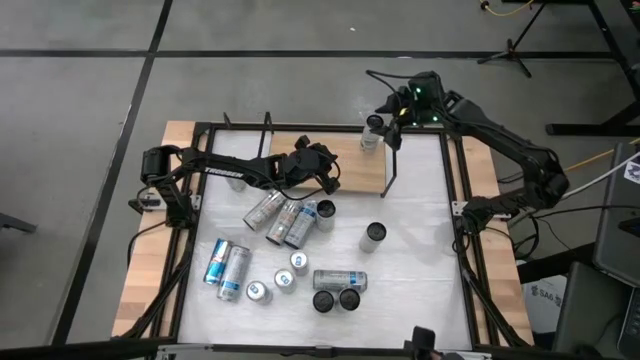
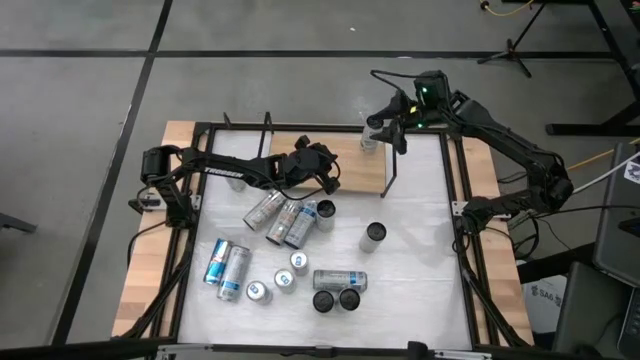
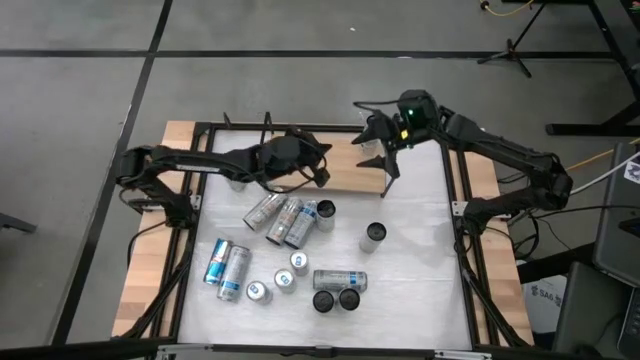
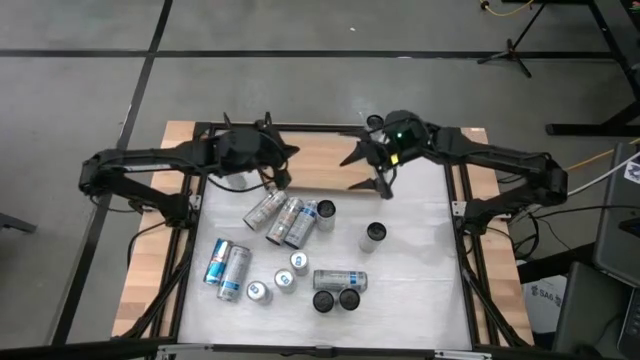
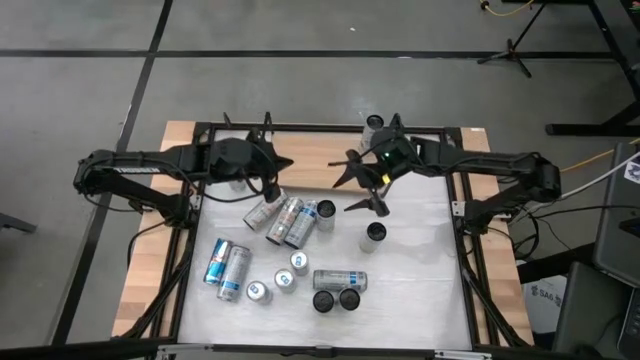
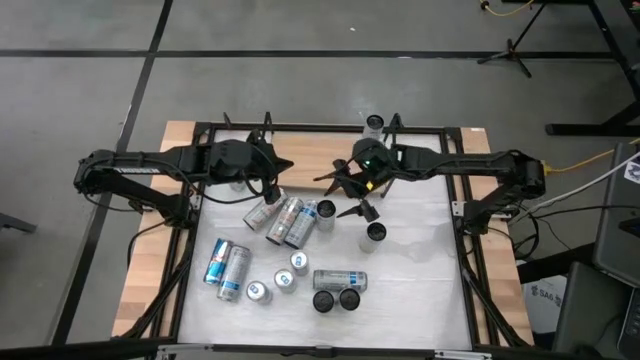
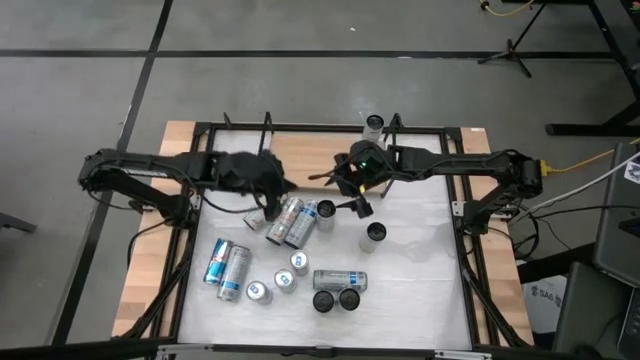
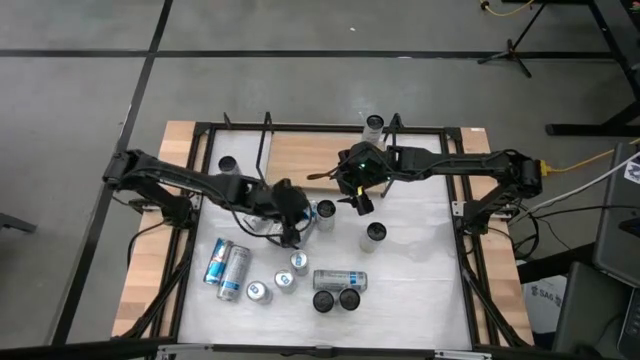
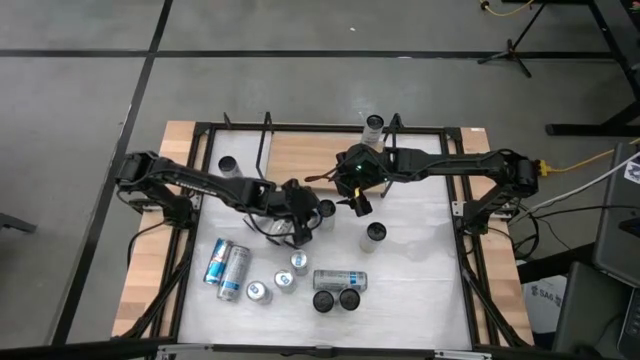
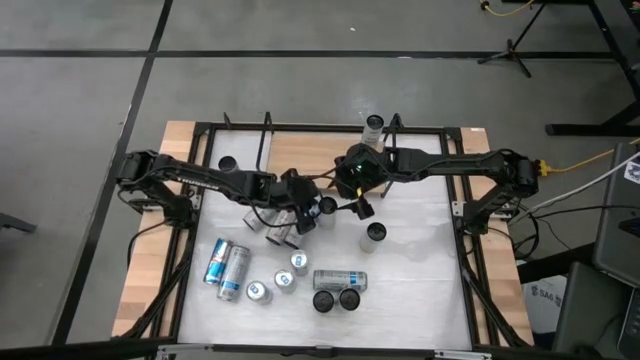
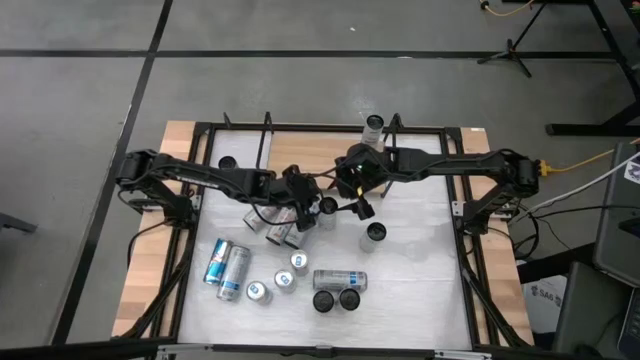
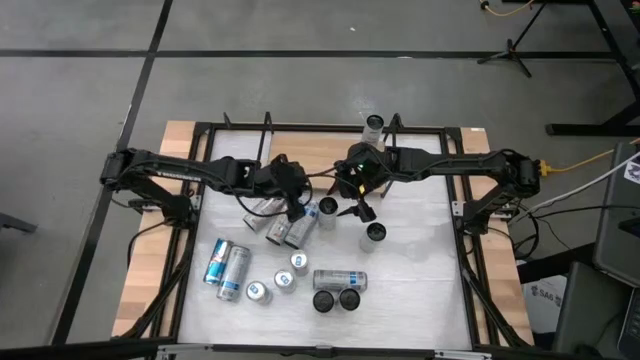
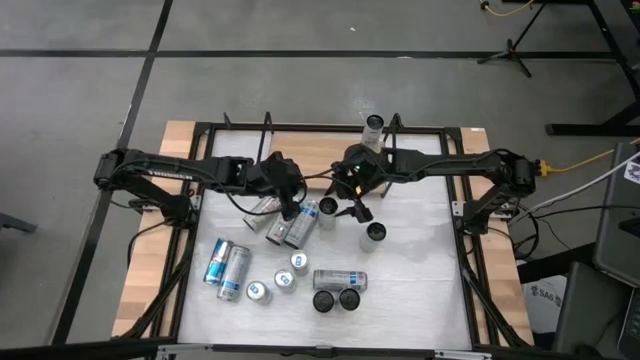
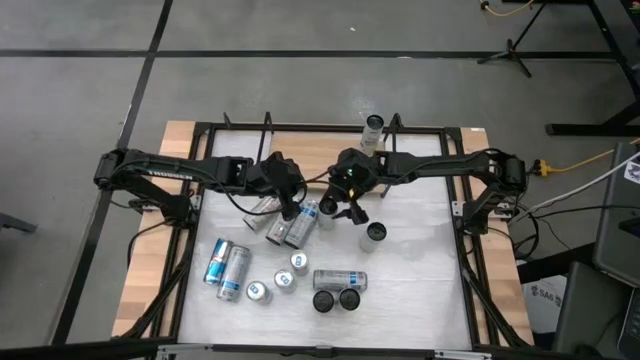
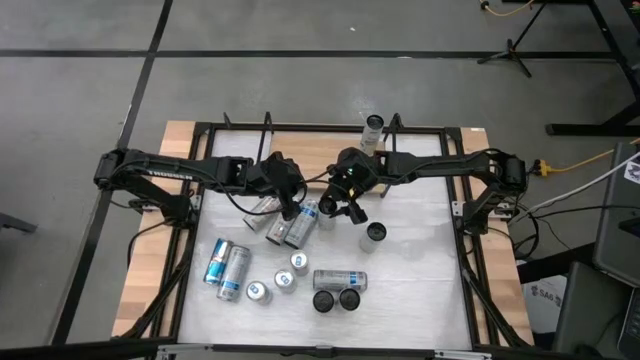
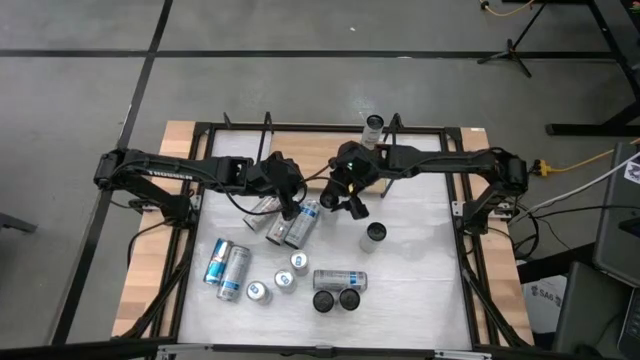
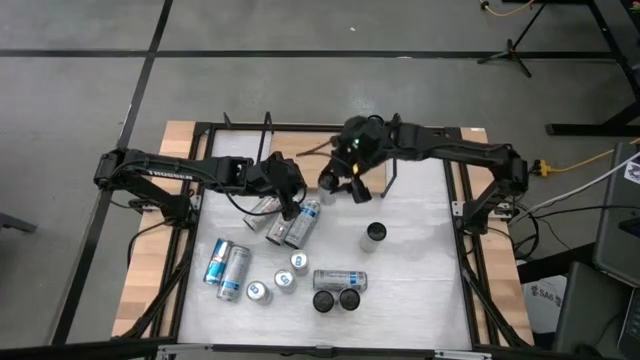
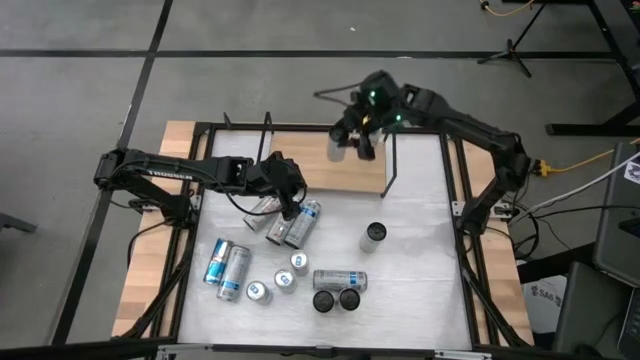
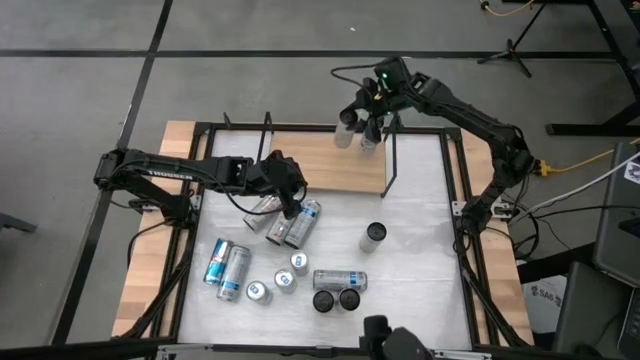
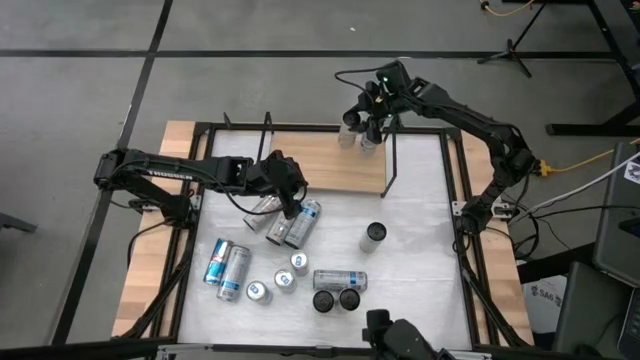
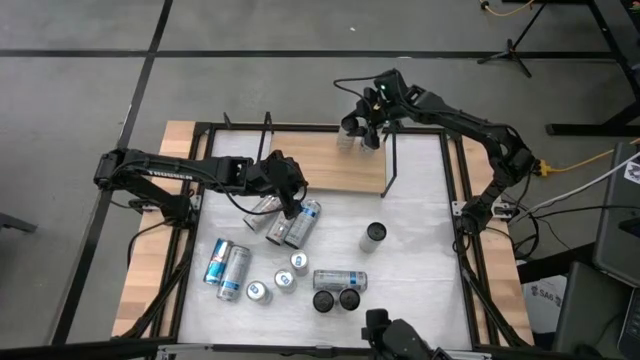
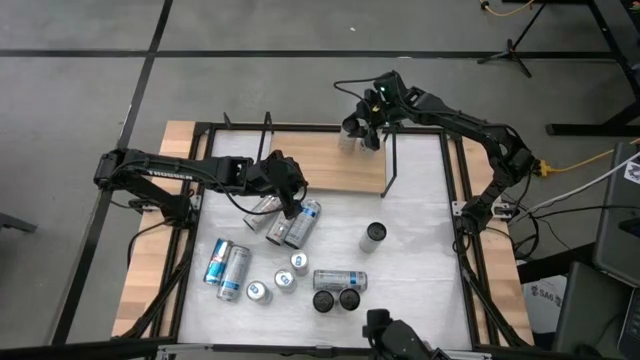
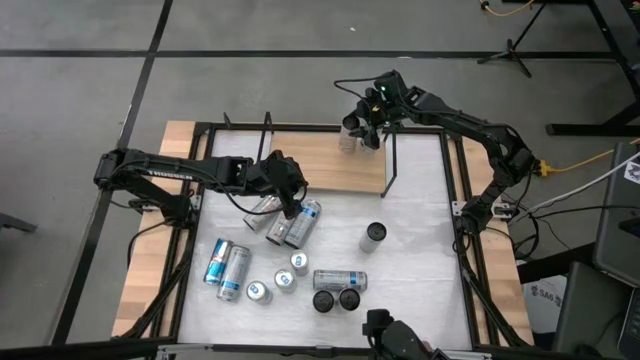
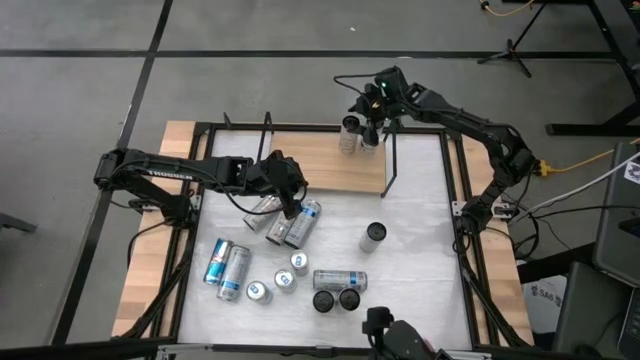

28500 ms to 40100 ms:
Task: Place canned beverage on shelf
Put the white soda can on the shelf

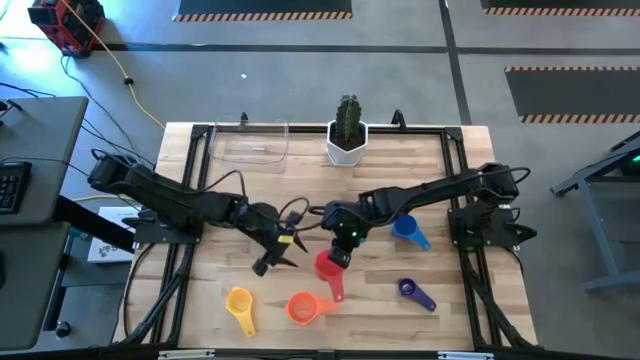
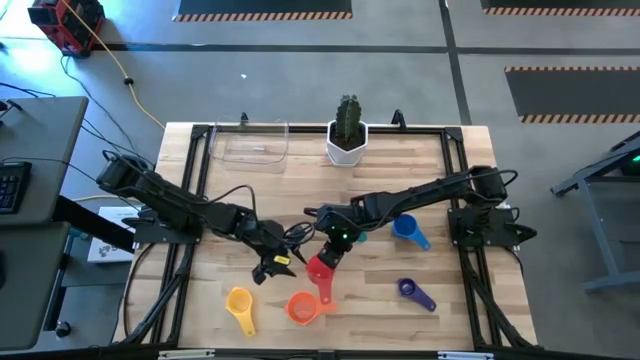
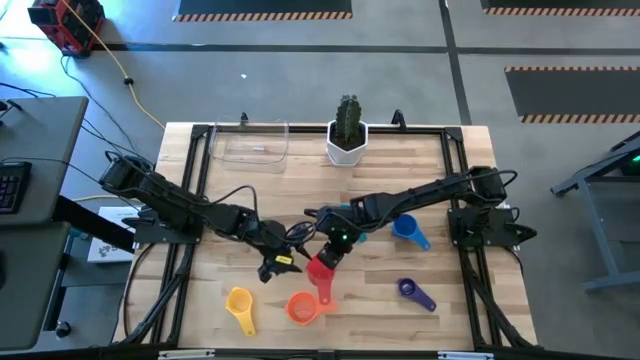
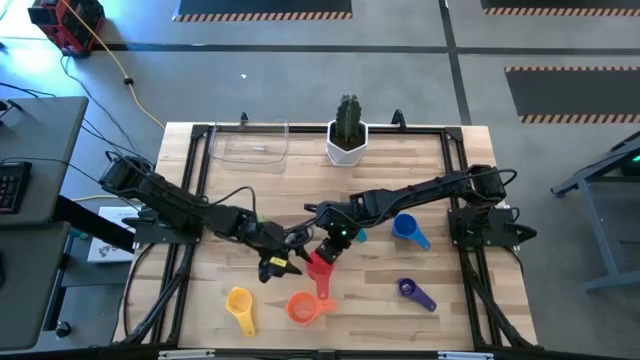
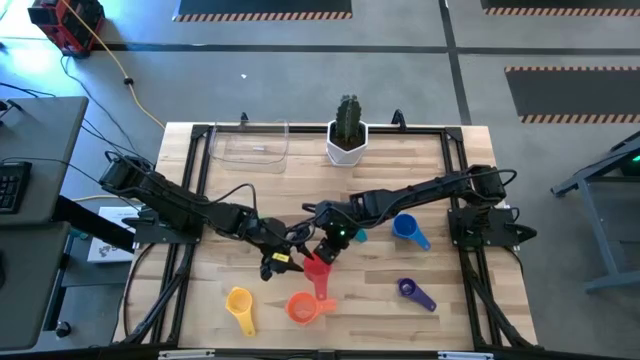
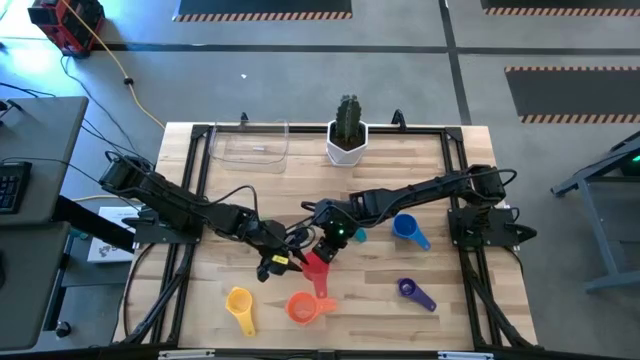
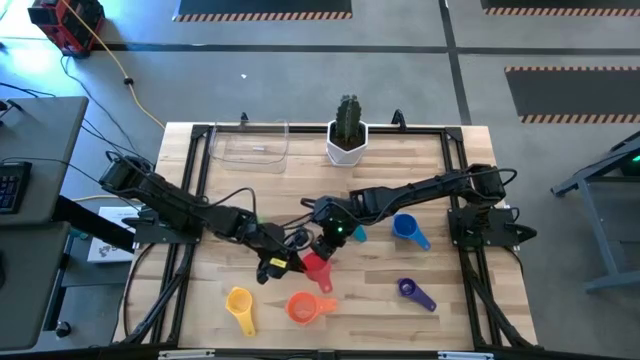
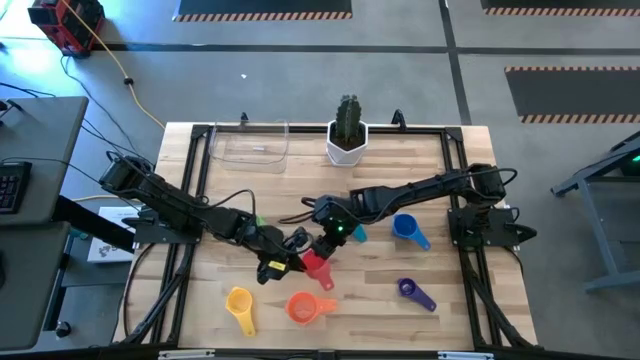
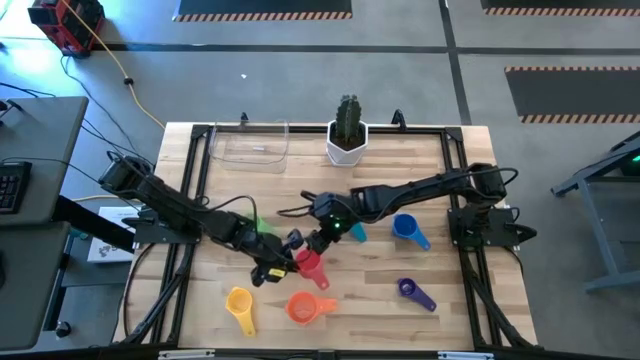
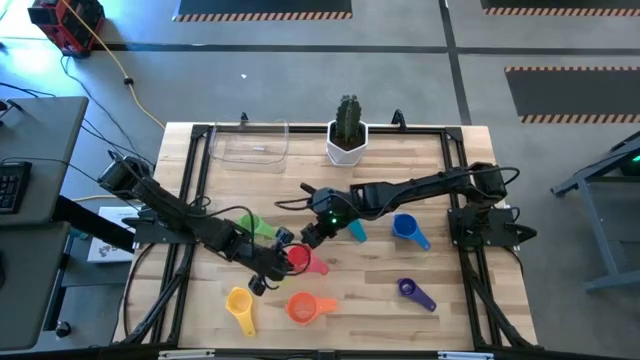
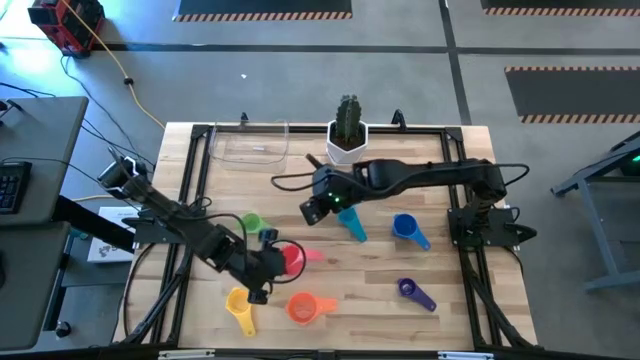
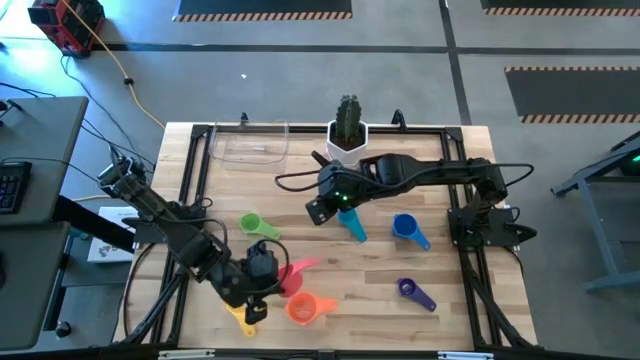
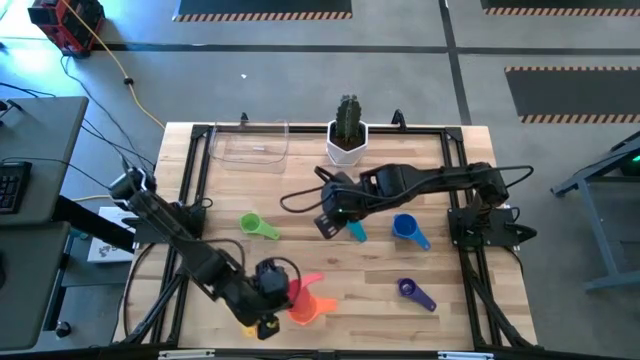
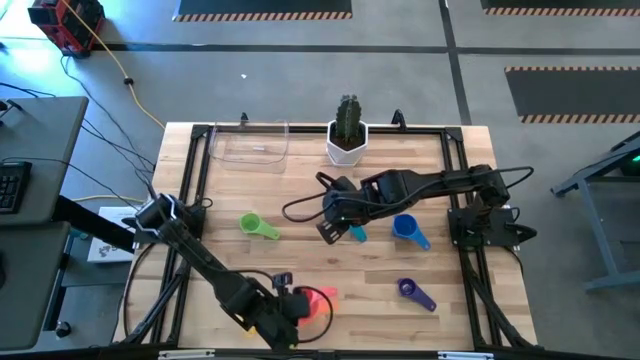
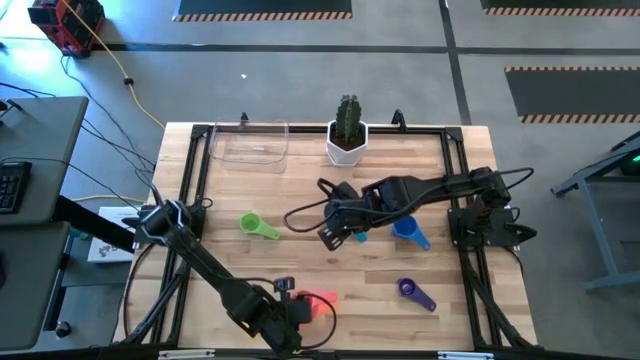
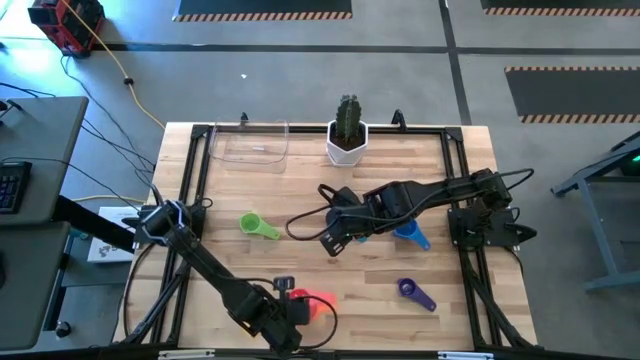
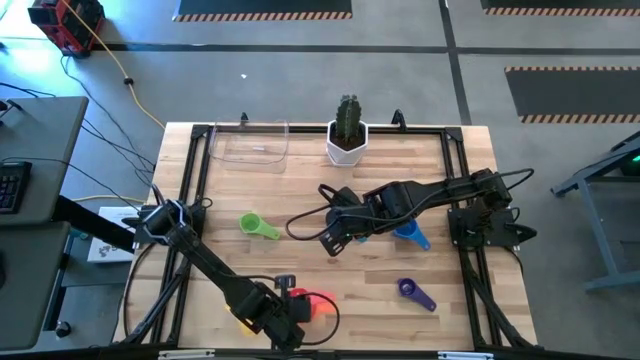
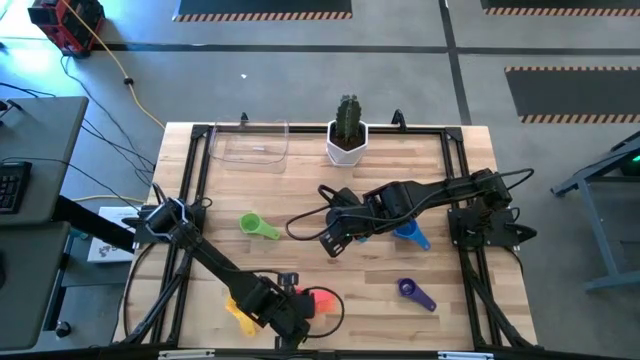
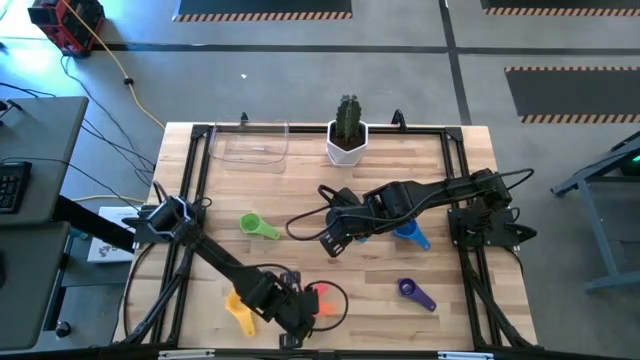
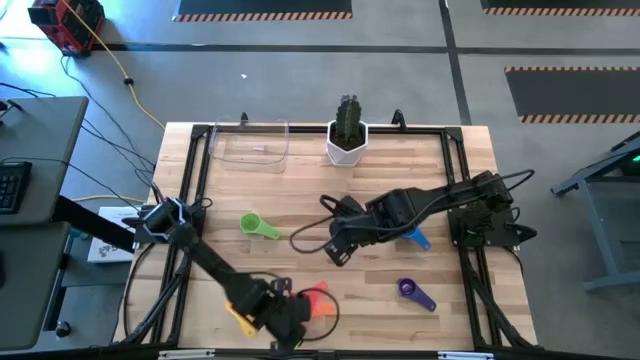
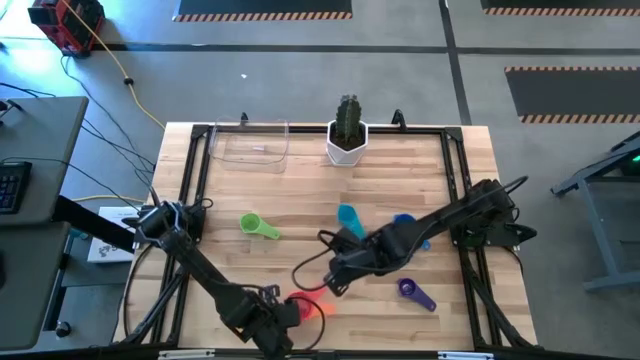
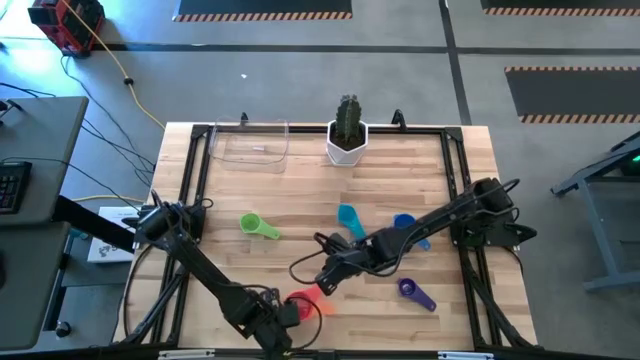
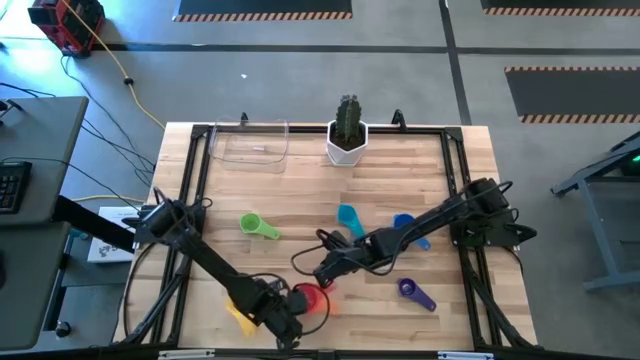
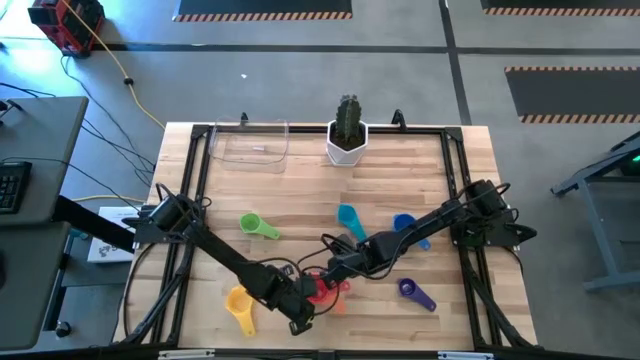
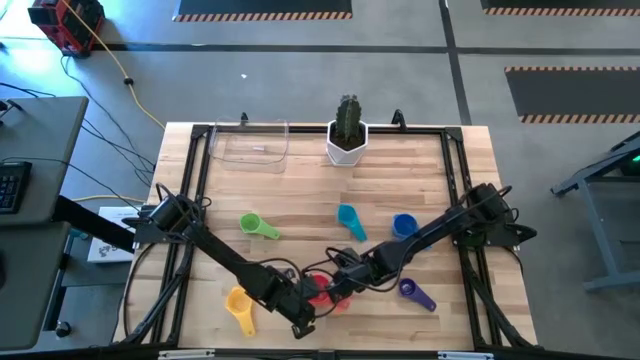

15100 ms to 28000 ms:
Task: Nest measuring cups in basket
Stack the pink measuring cup on the orange measuring cup
